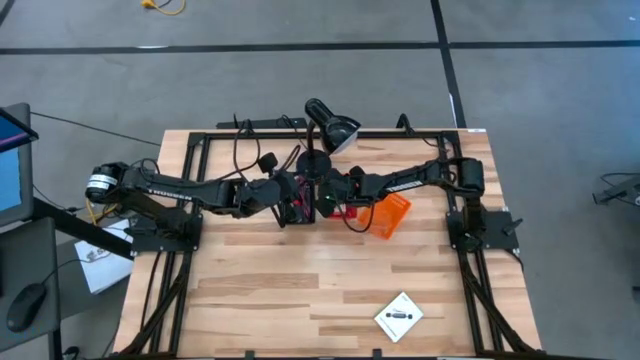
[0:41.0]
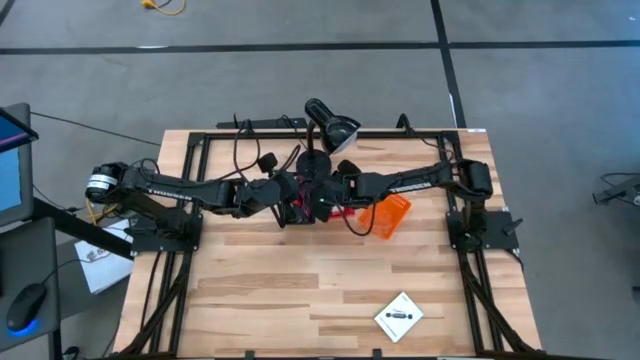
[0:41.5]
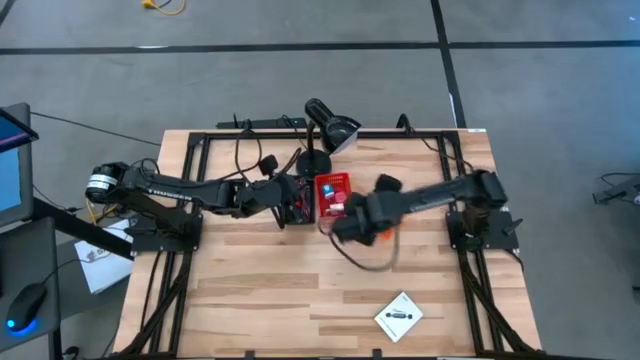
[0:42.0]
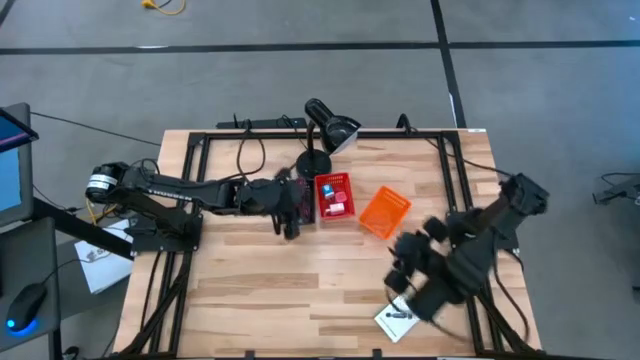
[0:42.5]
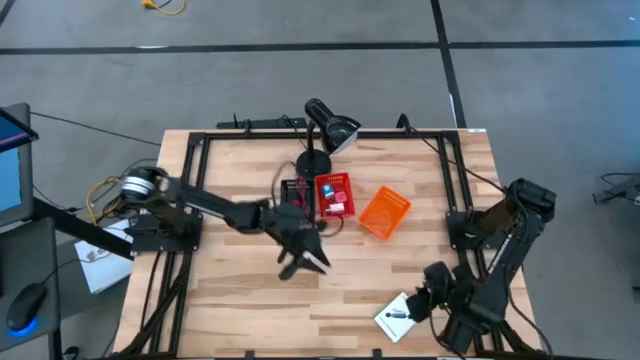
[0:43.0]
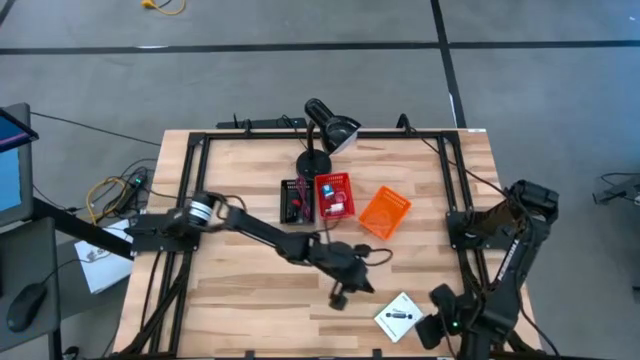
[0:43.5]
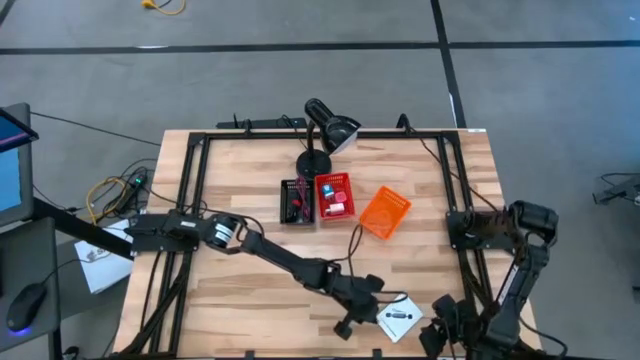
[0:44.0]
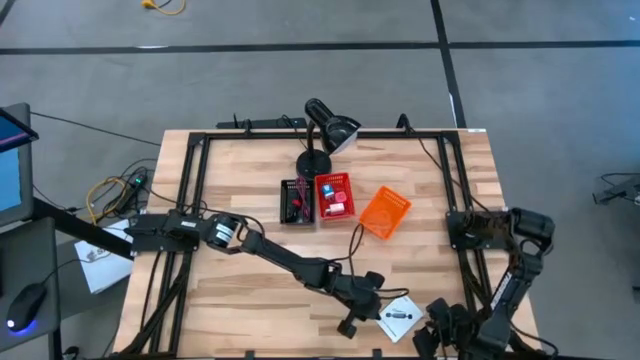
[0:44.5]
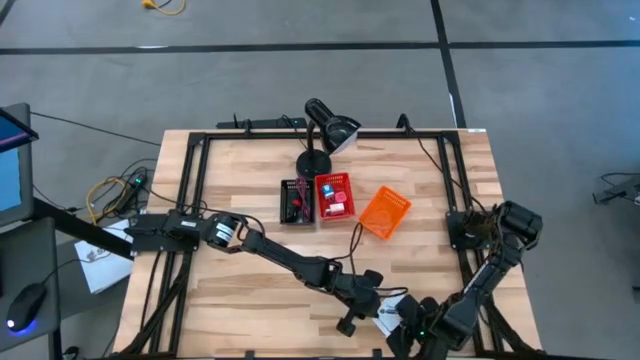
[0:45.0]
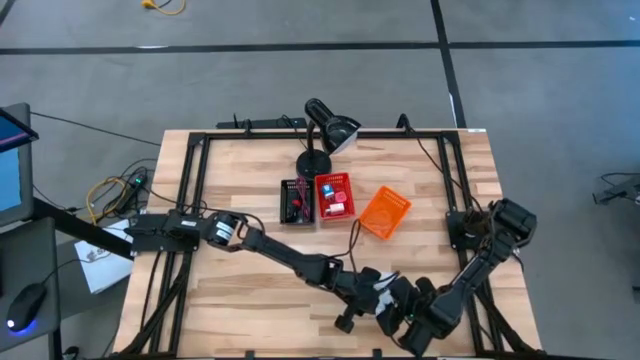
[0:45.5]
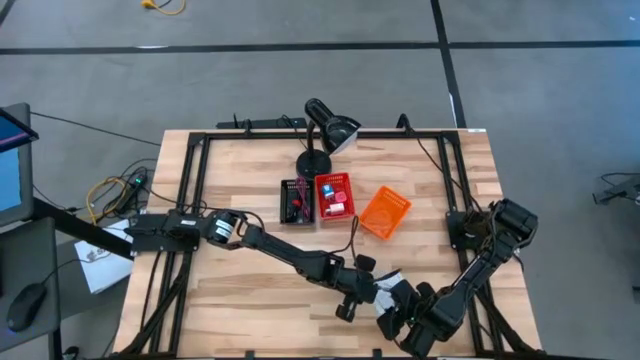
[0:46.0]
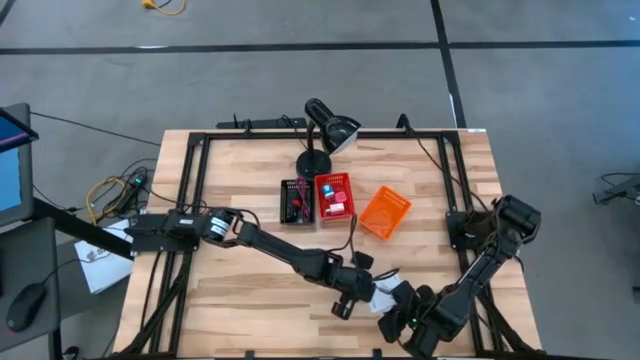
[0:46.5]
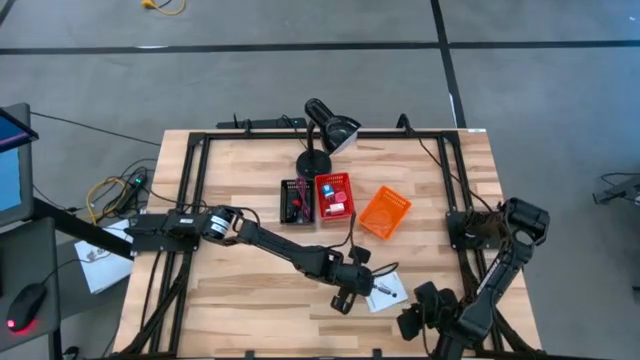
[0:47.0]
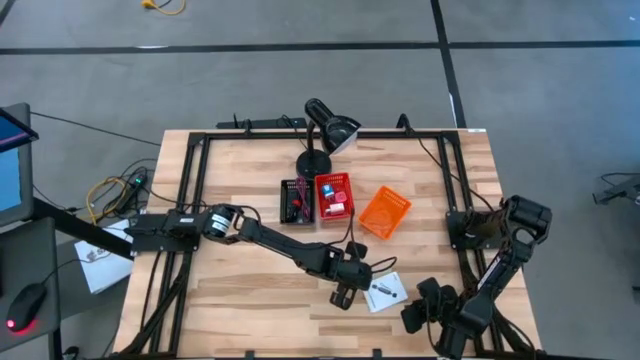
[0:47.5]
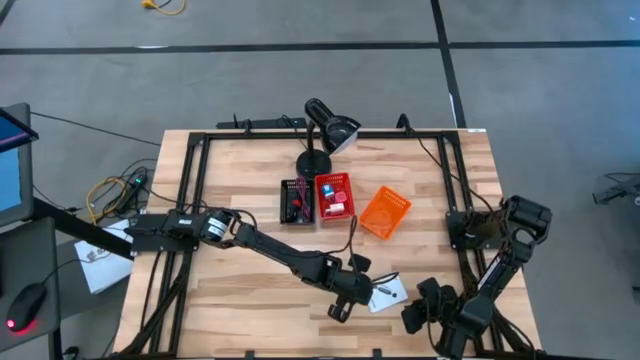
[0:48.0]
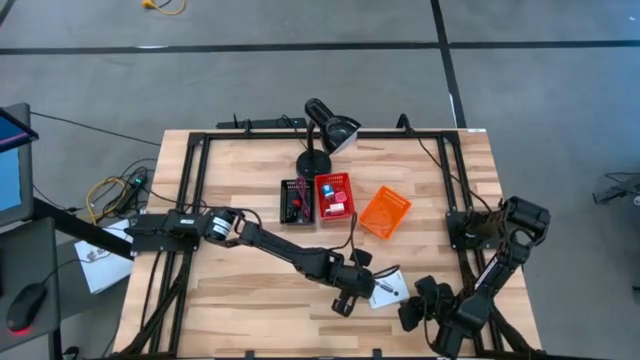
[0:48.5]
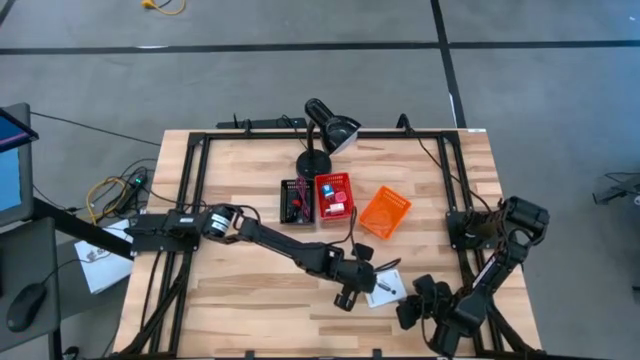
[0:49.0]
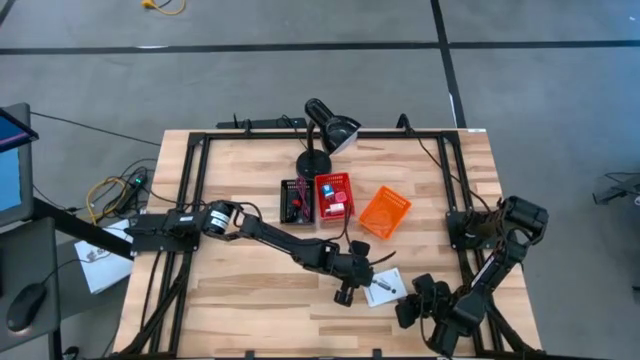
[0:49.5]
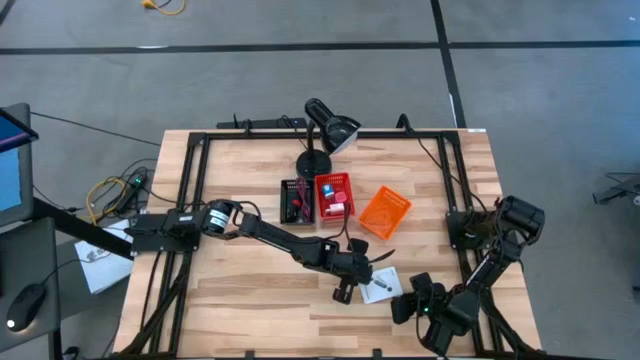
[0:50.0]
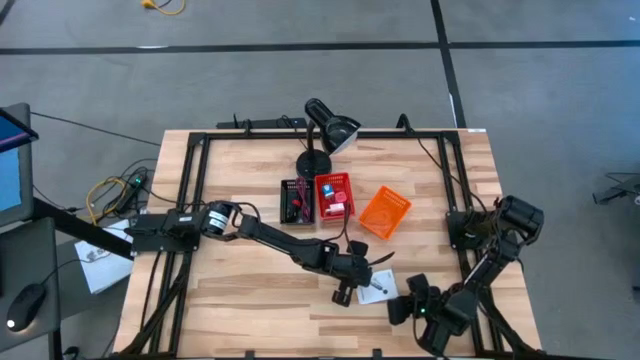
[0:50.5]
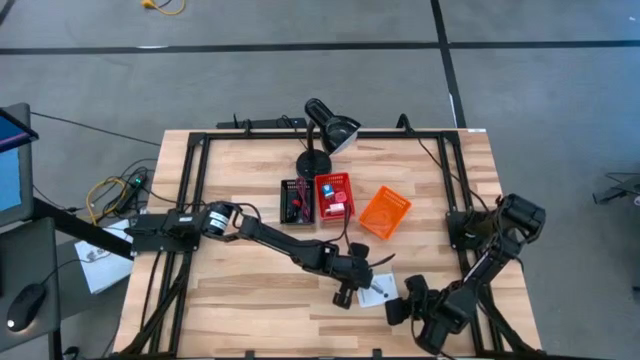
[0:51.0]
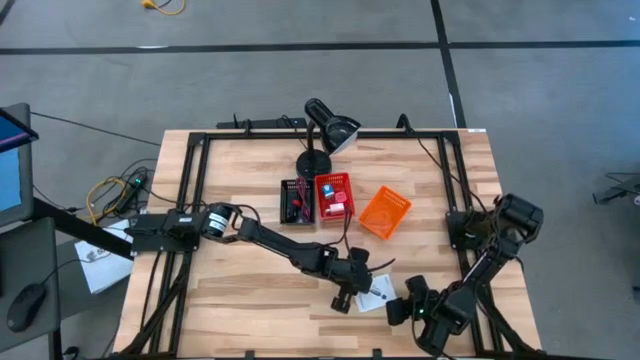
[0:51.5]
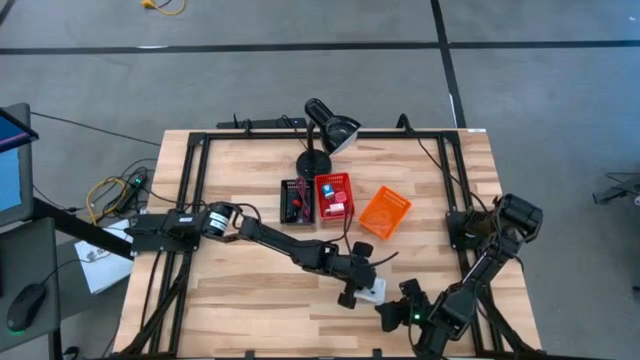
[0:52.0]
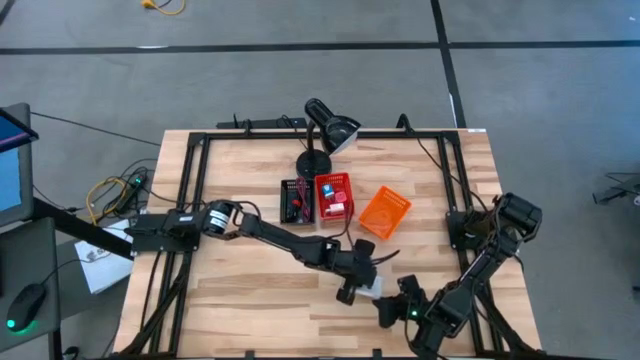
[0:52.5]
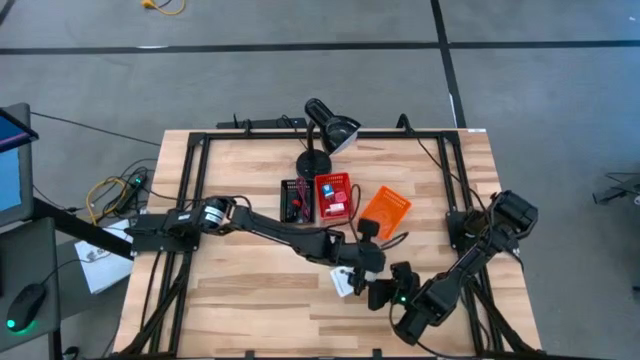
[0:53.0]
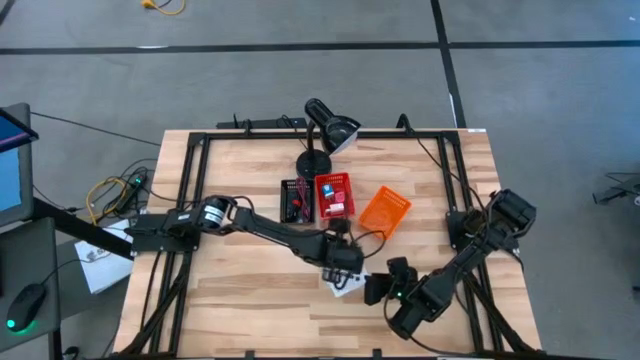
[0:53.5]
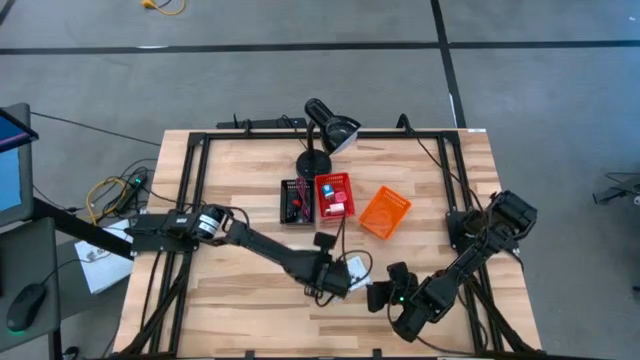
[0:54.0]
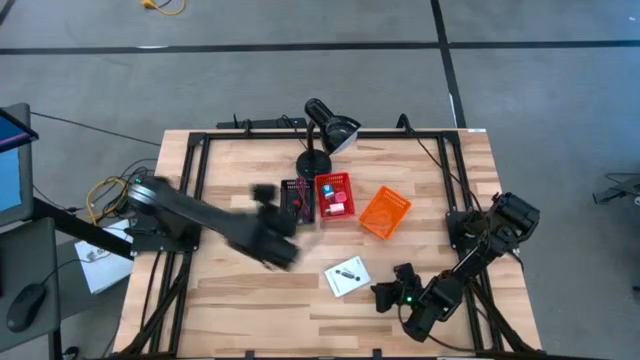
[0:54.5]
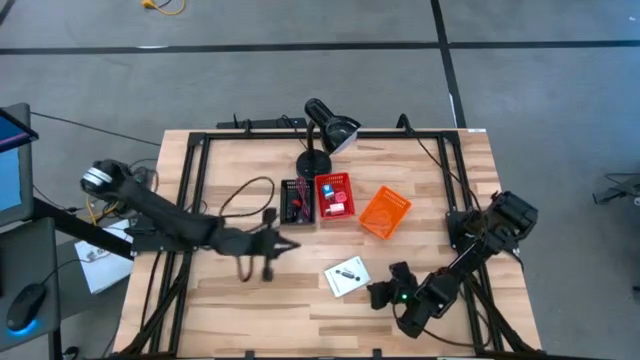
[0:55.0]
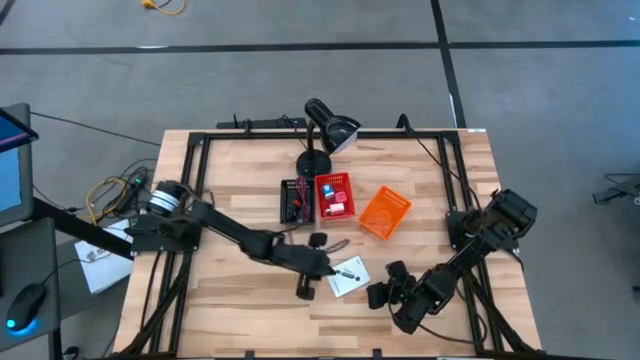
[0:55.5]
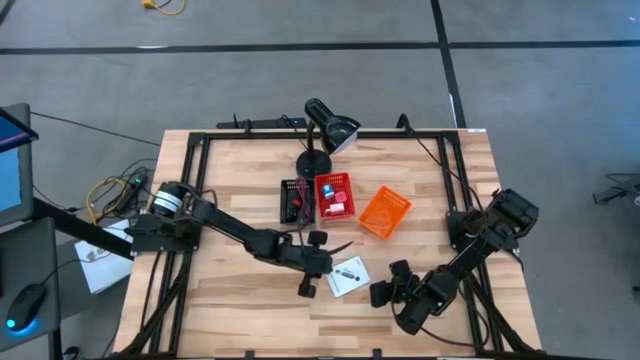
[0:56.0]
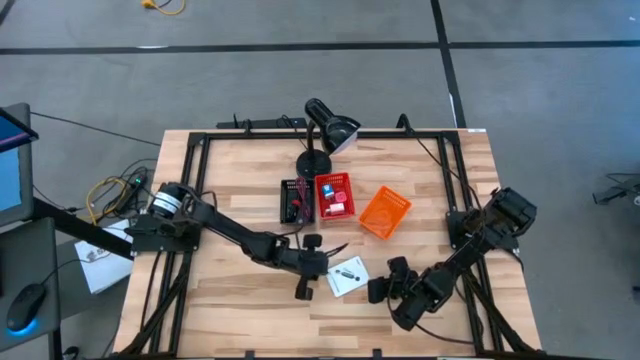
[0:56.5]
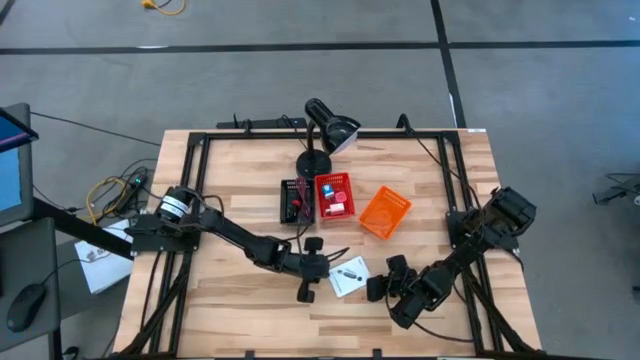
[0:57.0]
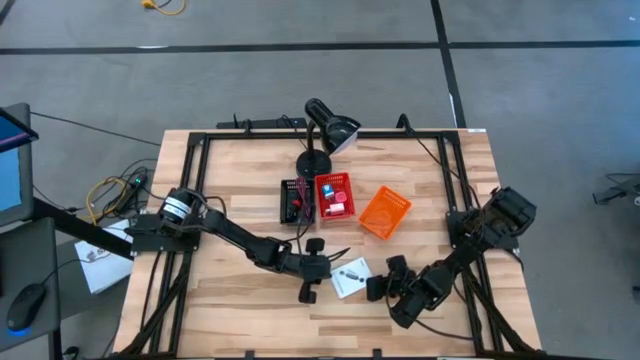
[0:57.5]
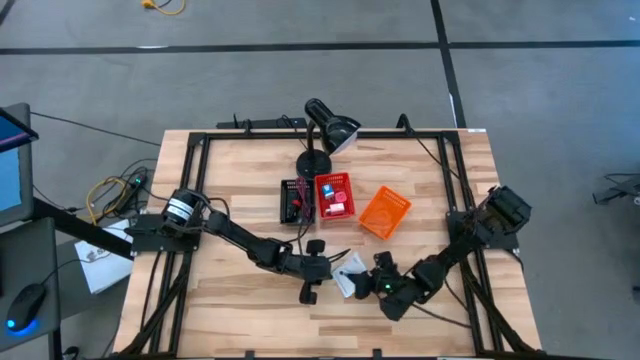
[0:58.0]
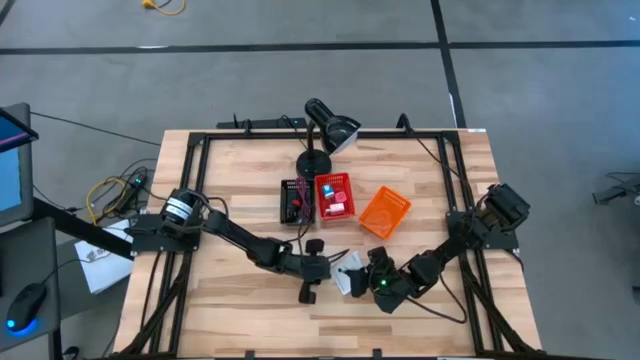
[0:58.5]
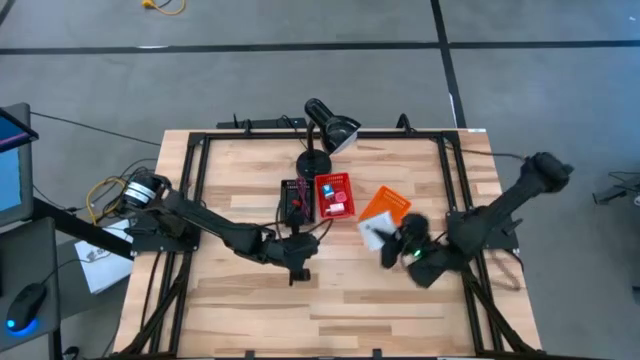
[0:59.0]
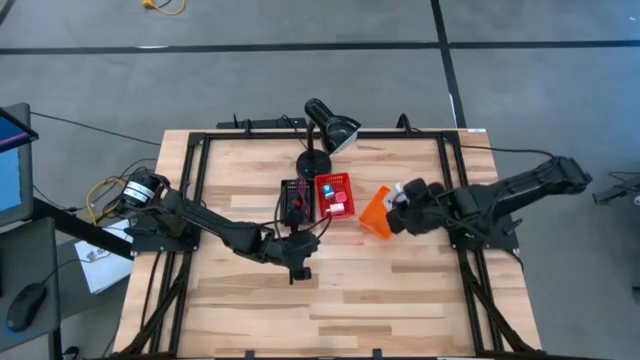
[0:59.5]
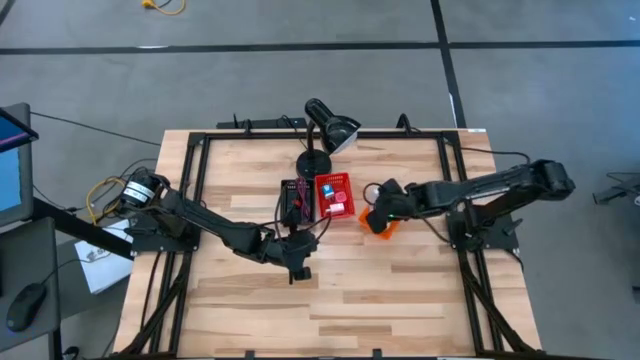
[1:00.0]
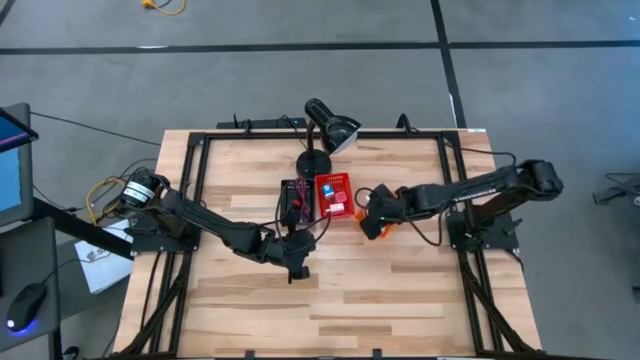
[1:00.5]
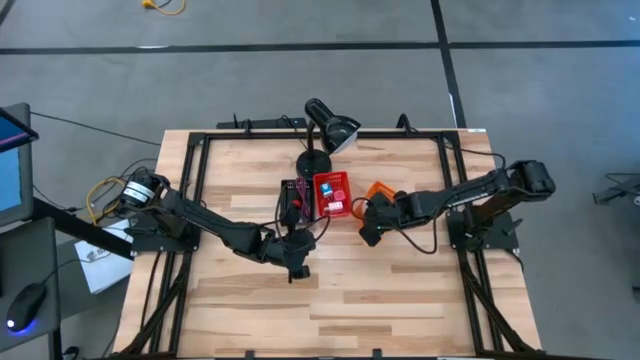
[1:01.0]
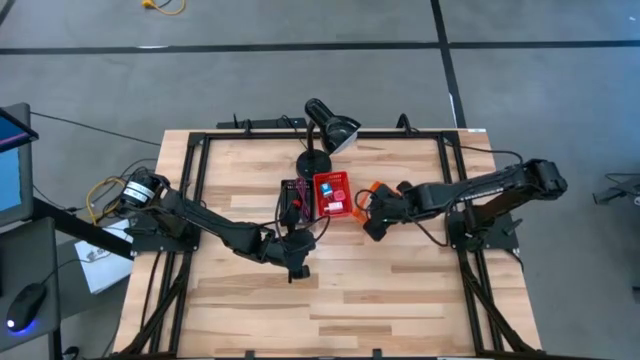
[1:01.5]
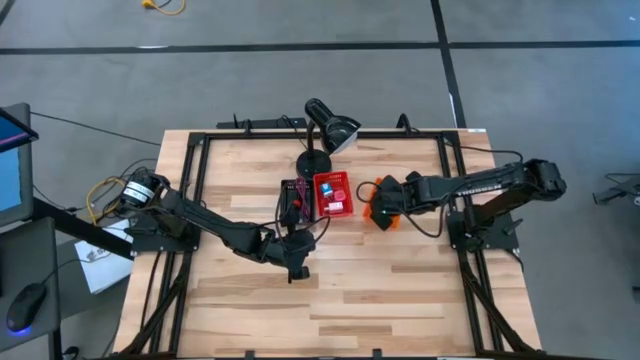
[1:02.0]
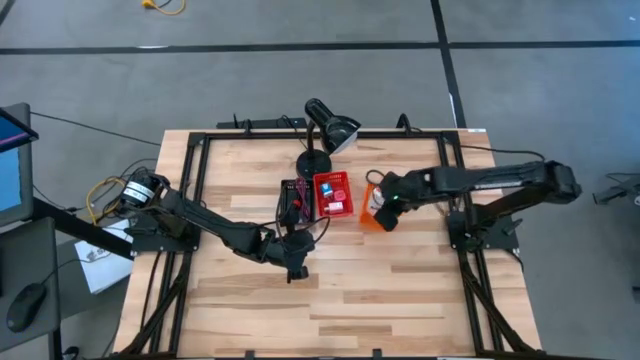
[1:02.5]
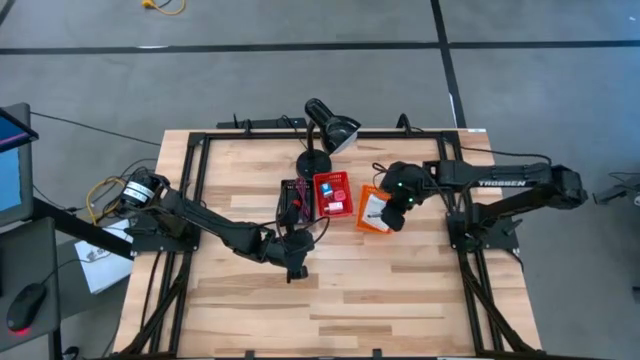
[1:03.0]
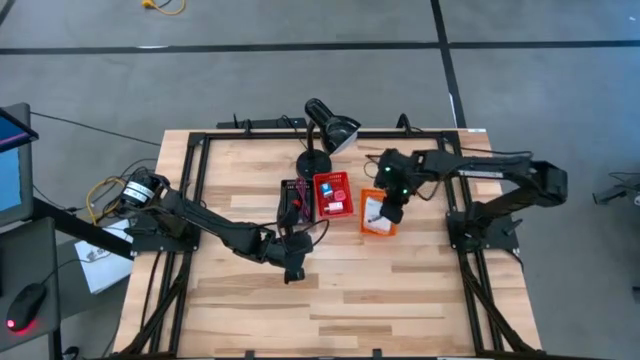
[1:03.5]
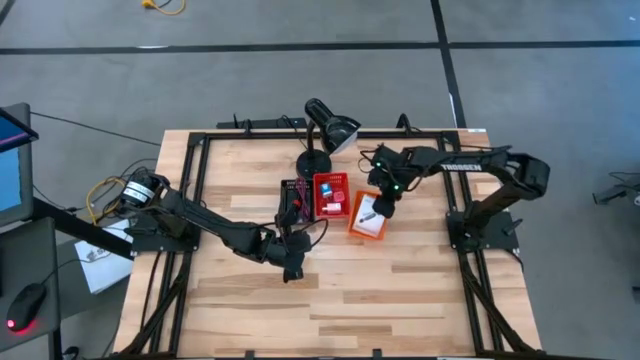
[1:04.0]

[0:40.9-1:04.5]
Task: Pick and place items into bin
Put the white card reader box into the orange bin
